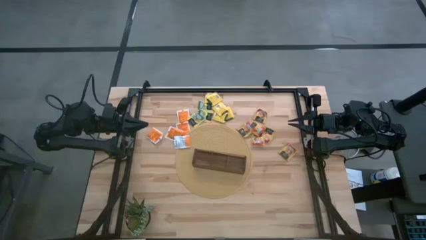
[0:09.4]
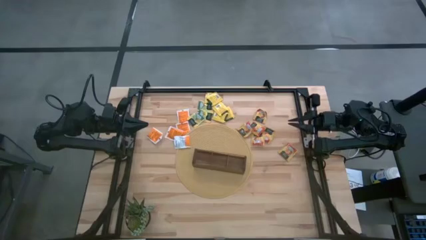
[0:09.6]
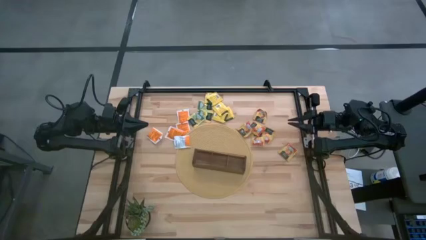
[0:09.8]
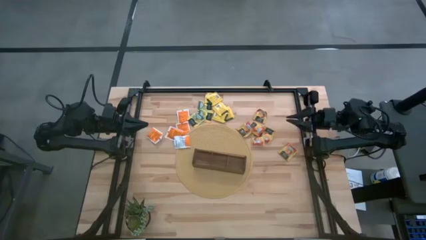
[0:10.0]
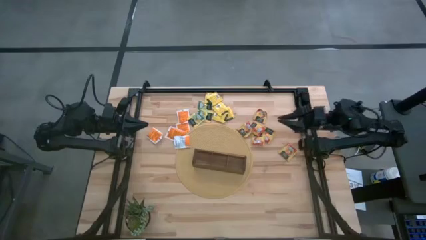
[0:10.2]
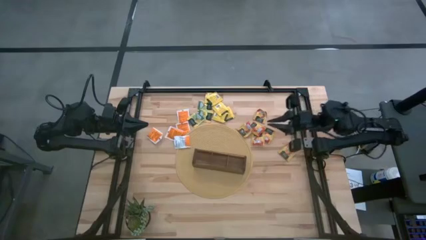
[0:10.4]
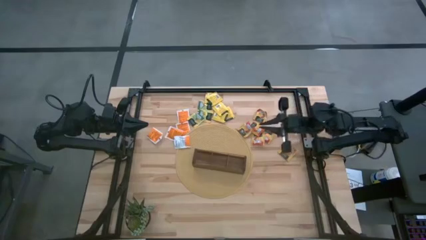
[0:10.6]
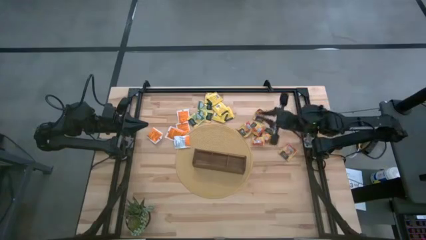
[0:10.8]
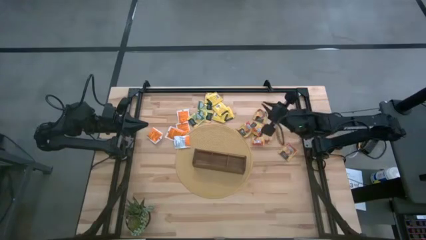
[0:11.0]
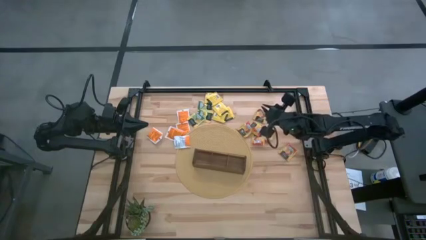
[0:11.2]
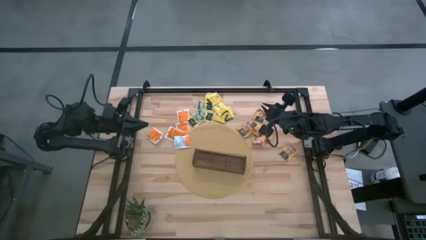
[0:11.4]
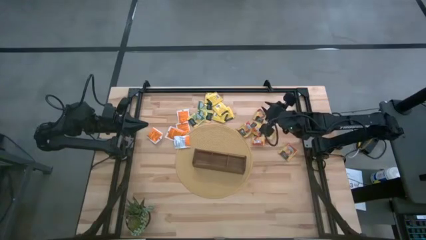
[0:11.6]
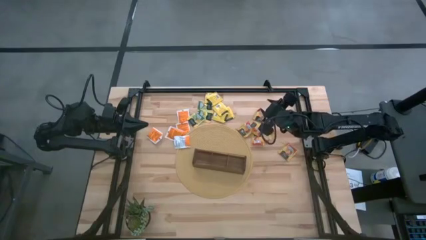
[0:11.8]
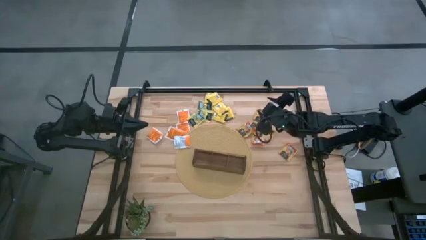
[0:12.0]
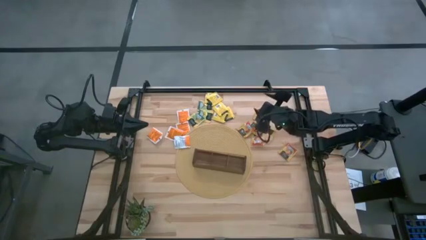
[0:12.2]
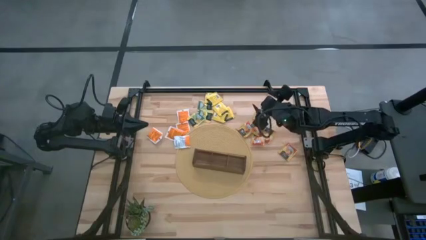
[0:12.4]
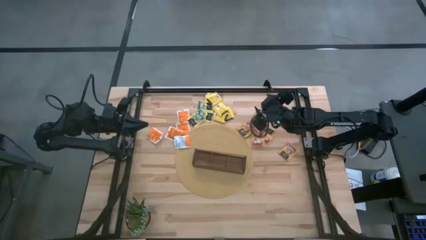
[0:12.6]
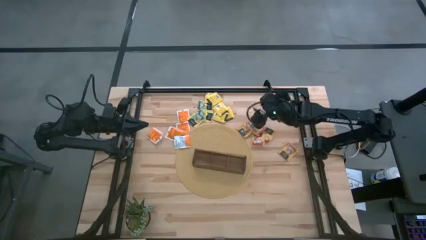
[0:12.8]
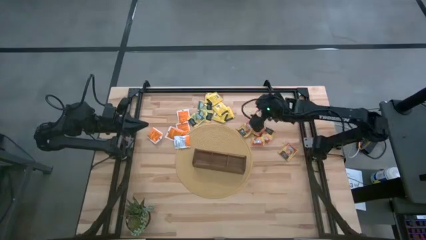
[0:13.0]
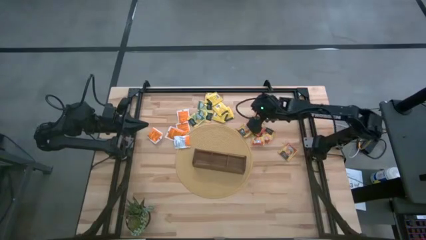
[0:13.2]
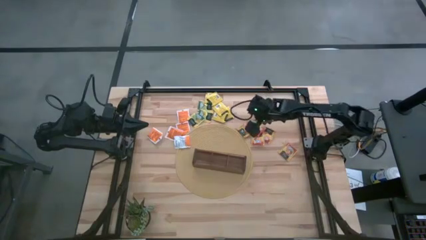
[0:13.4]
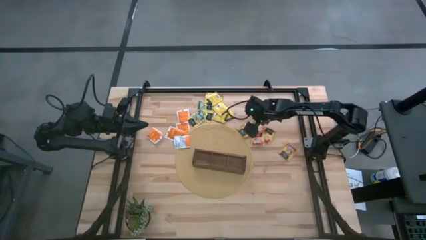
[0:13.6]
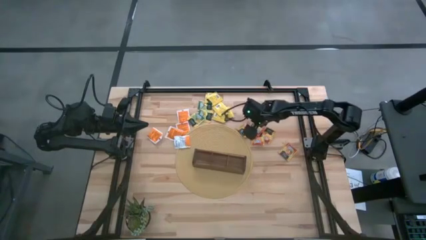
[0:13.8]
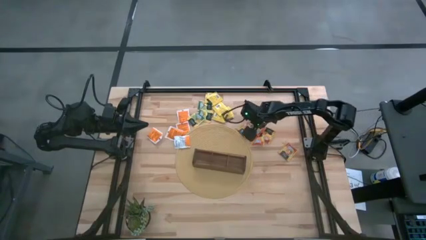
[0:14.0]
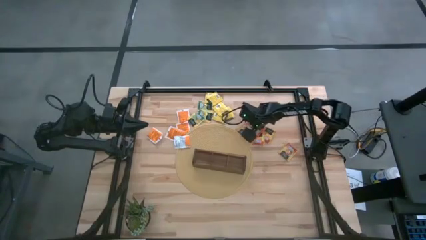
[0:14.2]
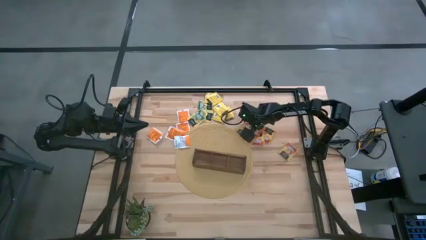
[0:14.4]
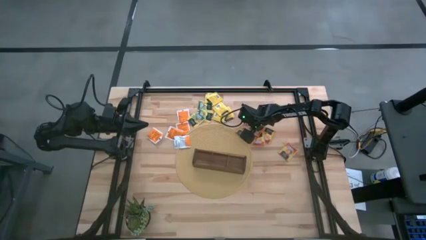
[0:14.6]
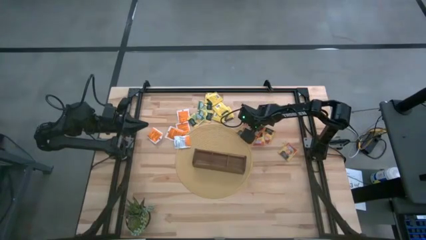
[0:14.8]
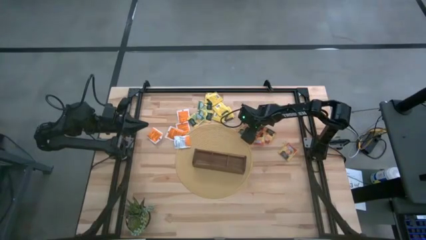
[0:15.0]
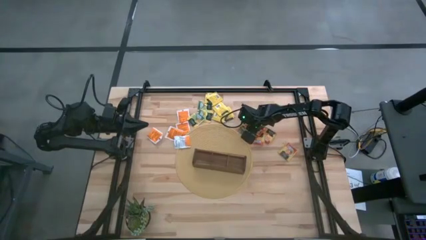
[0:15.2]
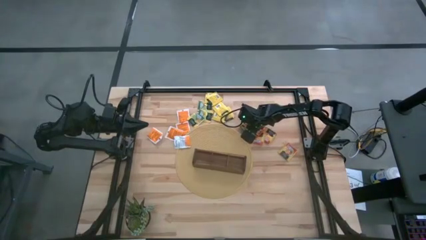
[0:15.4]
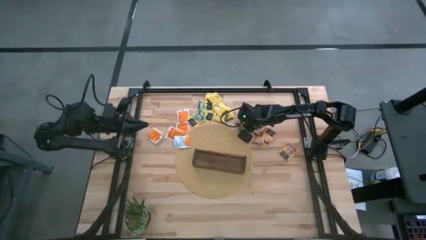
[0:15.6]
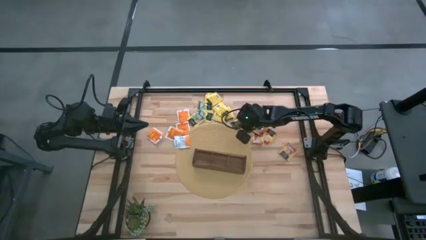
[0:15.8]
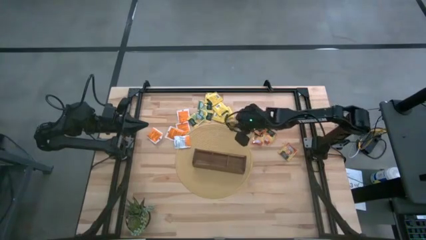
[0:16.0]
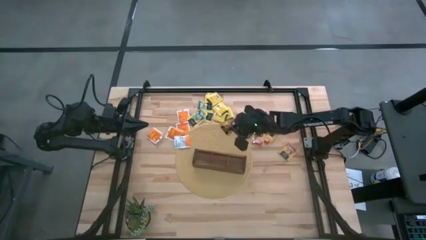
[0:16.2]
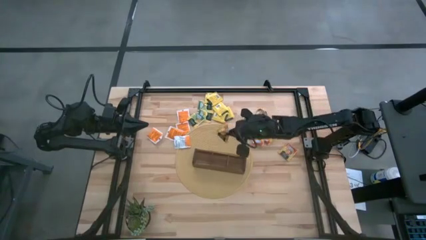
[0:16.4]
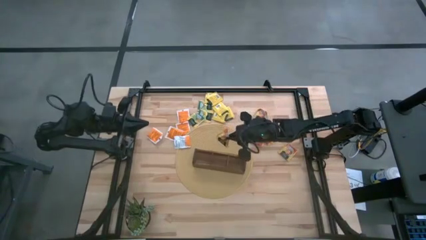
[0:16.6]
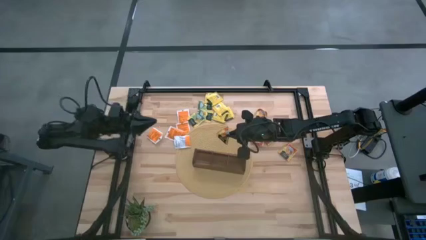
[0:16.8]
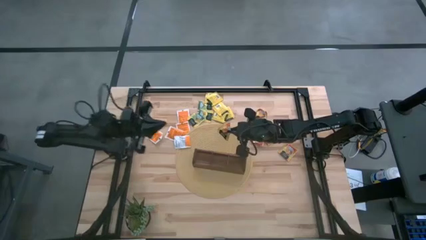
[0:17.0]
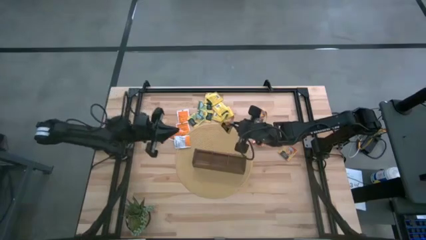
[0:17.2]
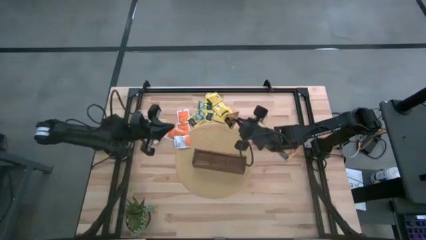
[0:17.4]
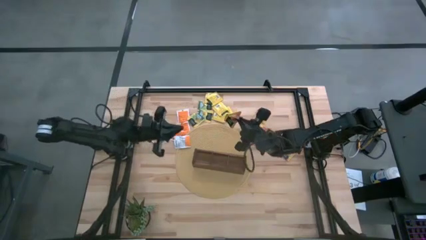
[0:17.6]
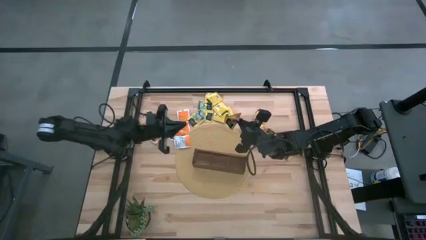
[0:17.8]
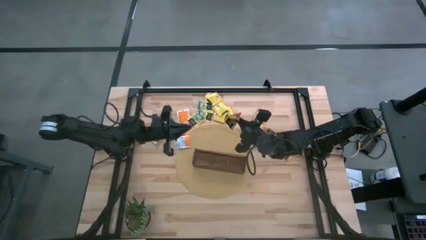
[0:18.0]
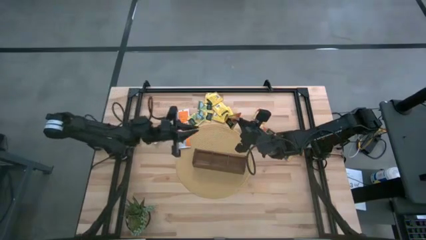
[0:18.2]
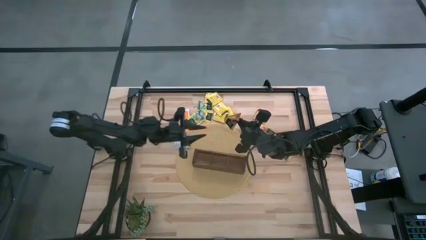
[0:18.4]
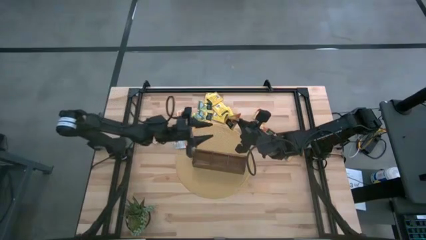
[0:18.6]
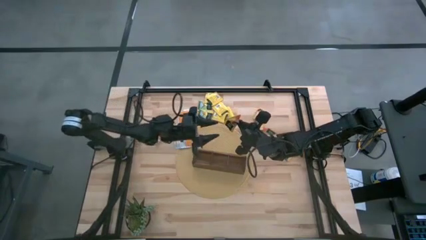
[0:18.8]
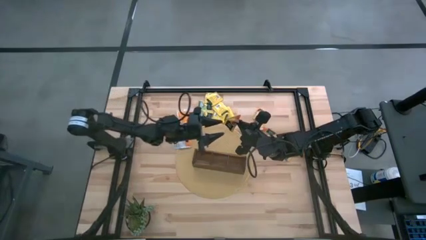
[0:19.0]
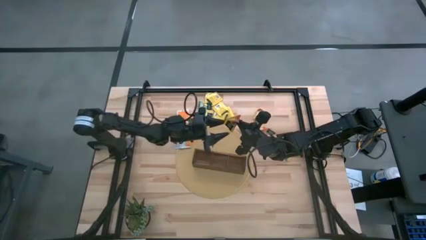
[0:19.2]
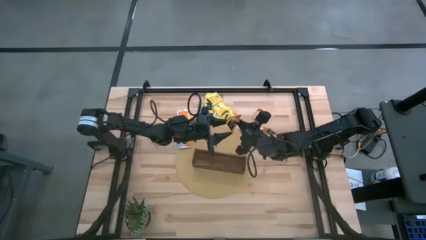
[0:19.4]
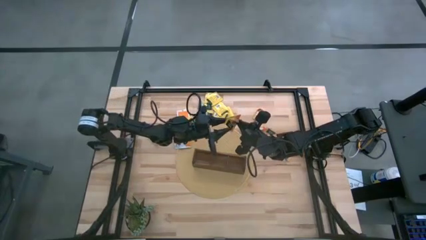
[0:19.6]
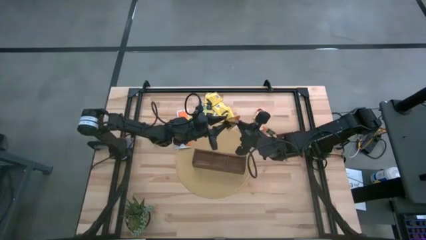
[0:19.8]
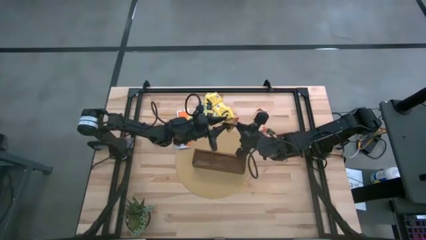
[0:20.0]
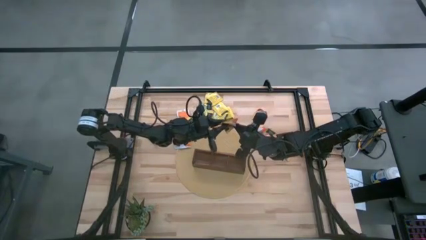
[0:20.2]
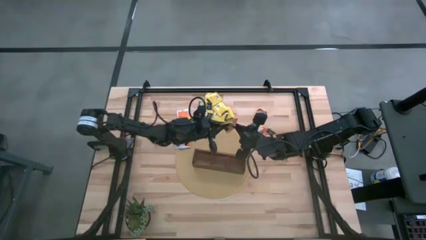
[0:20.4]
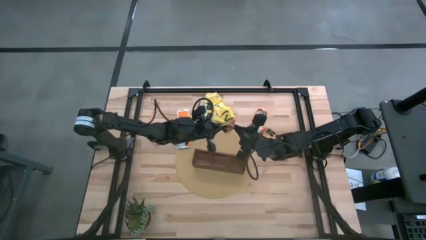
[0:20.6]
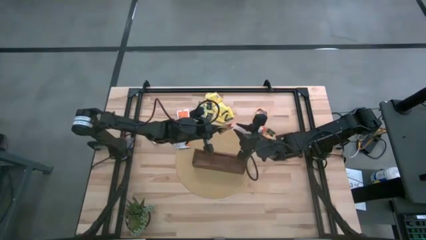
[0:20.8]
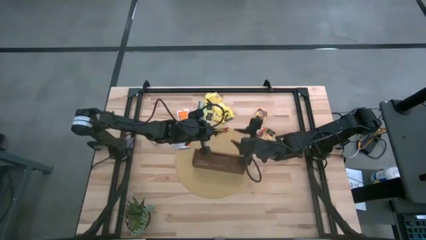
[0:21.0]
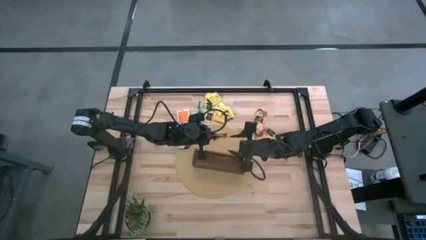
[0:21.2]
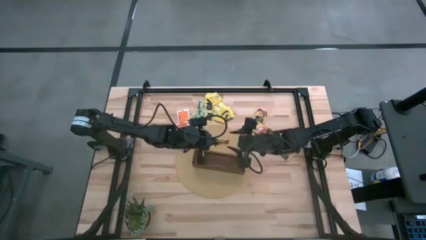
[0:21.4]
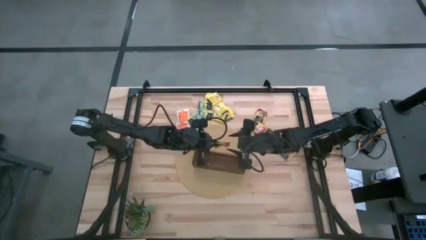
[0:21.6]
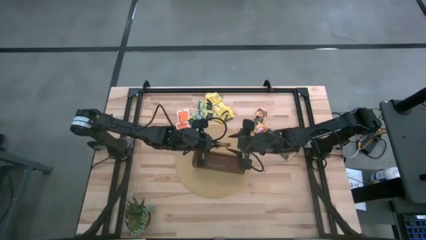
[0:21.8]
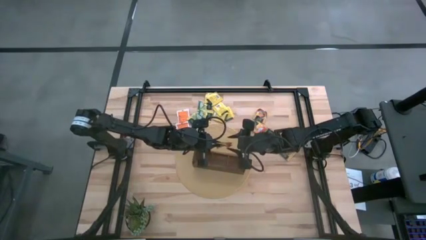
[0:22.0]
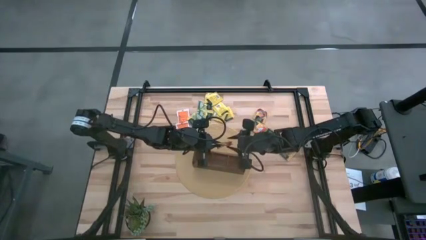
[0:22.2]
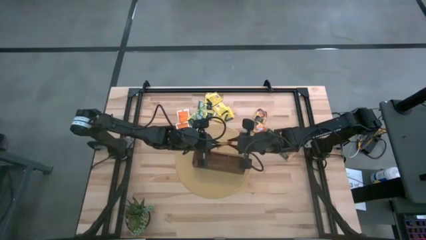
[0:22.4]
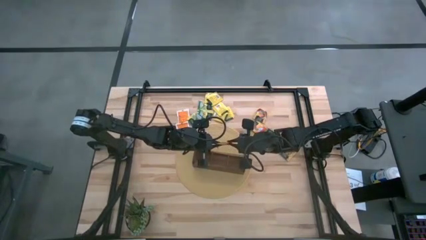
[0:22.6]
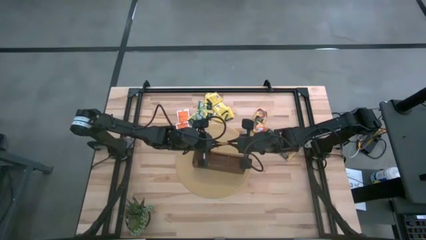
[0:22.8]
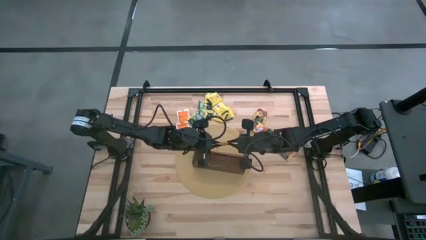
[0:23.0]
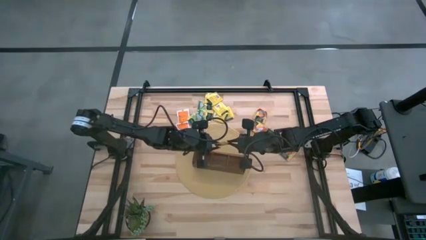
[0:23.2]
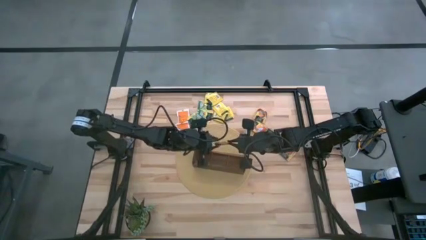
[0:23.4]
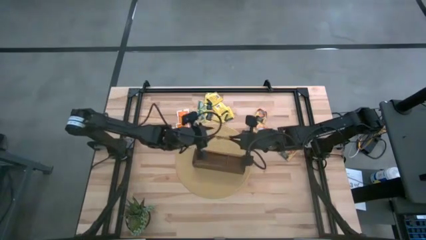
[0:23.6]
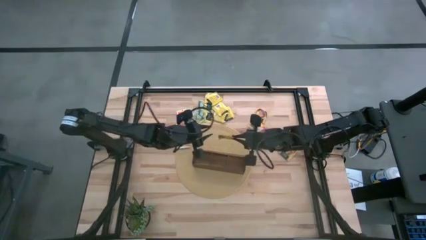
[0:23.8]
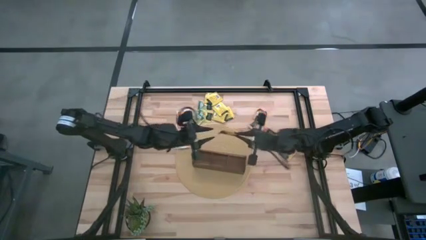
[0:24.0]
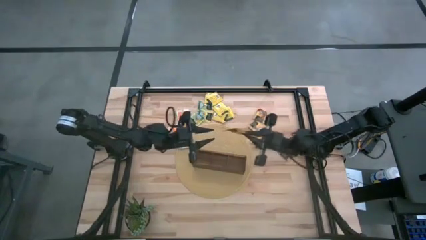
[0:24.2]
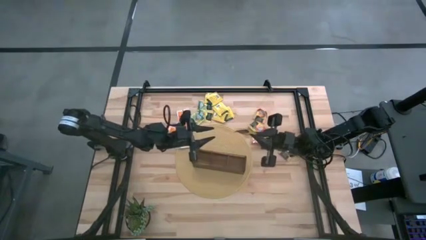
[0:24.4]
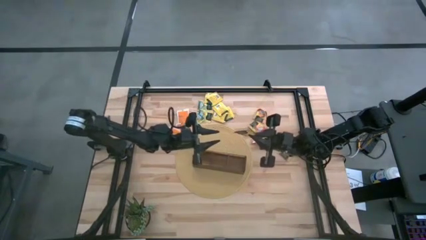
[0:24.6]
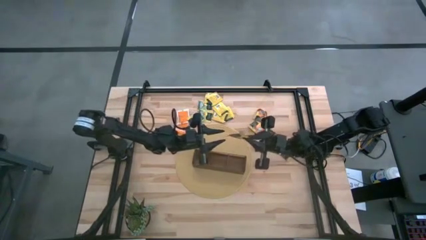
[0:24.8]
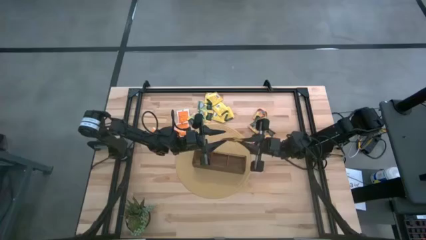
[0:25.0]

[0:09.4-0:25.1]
Task: Pick & Place Tea
Put the orange and green tea bag into the wooden organizer
